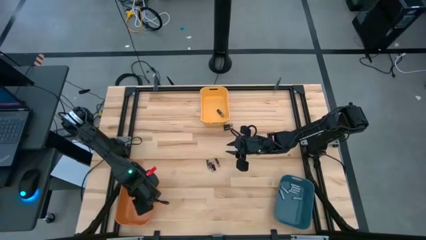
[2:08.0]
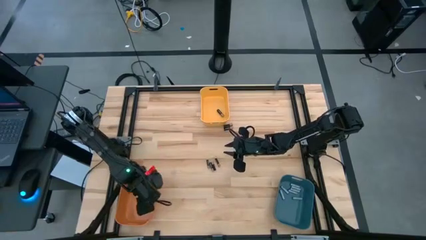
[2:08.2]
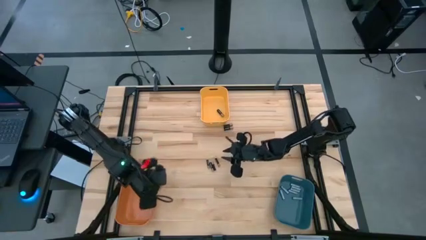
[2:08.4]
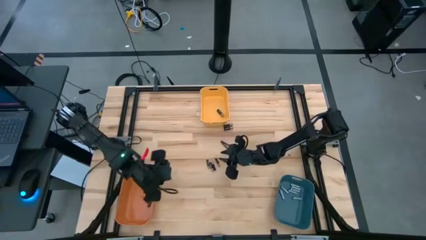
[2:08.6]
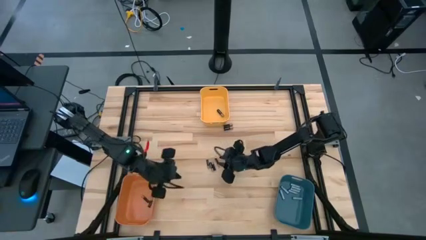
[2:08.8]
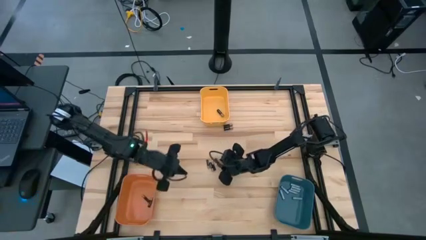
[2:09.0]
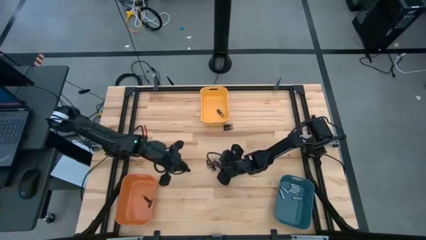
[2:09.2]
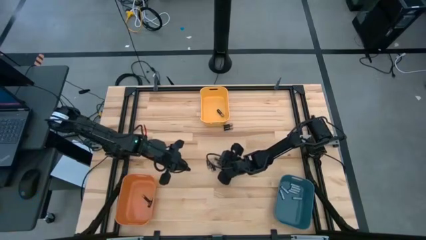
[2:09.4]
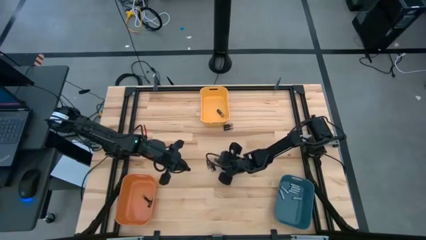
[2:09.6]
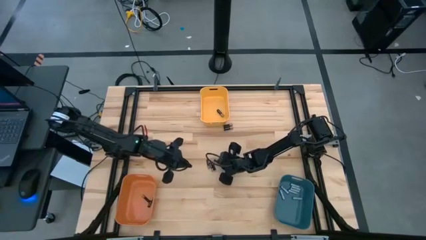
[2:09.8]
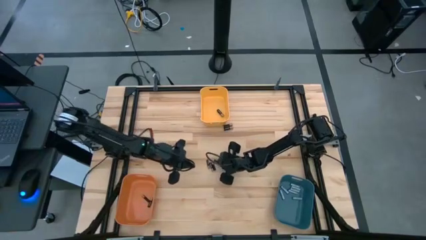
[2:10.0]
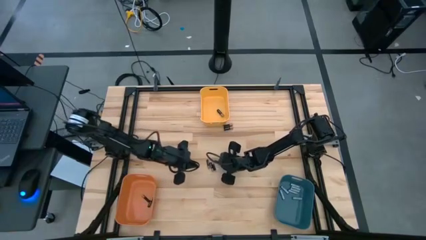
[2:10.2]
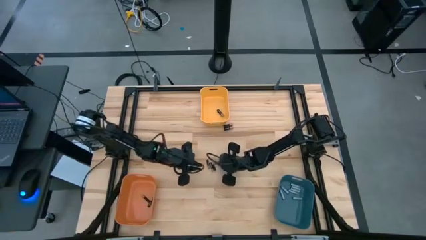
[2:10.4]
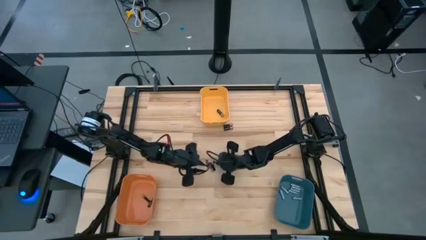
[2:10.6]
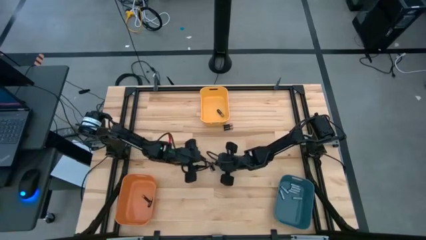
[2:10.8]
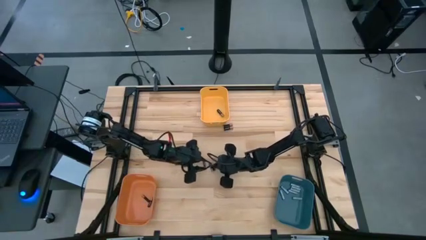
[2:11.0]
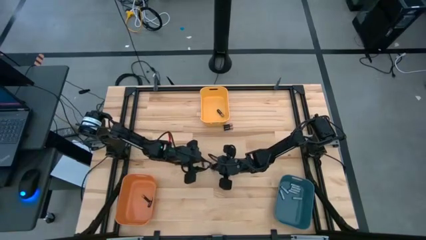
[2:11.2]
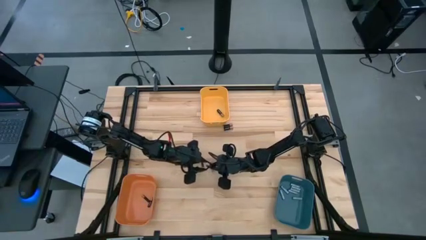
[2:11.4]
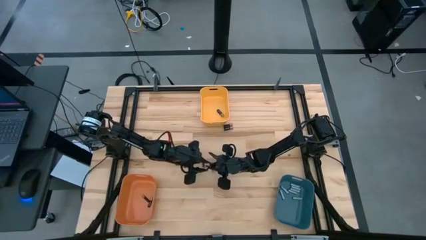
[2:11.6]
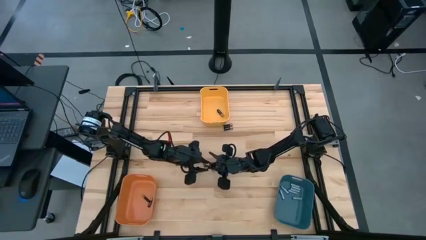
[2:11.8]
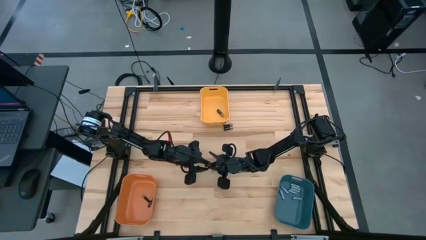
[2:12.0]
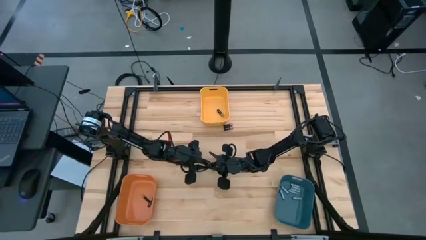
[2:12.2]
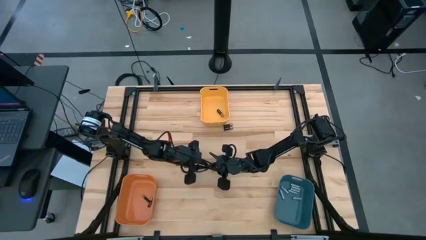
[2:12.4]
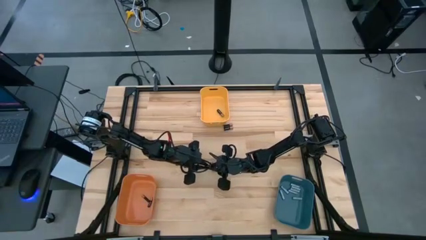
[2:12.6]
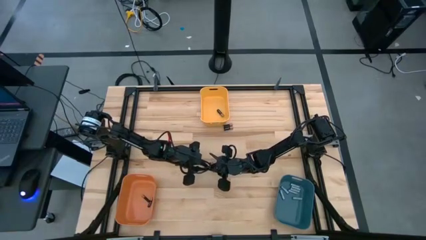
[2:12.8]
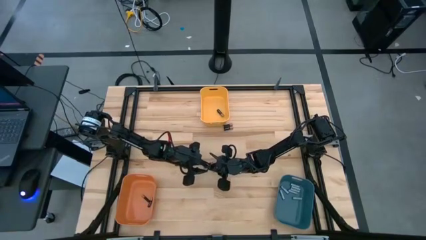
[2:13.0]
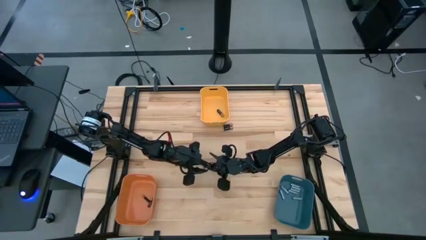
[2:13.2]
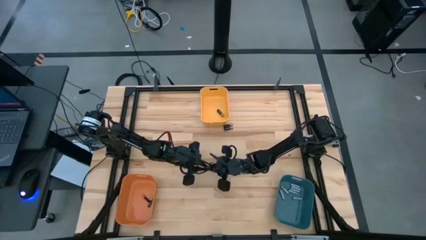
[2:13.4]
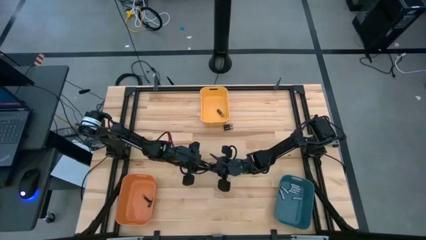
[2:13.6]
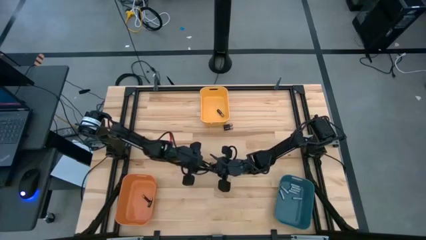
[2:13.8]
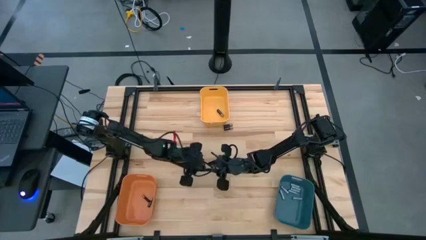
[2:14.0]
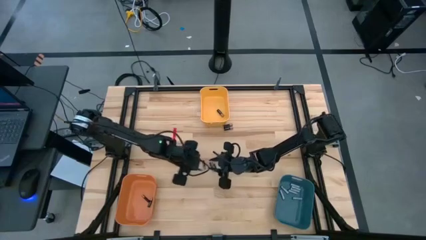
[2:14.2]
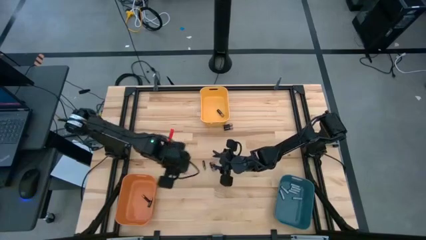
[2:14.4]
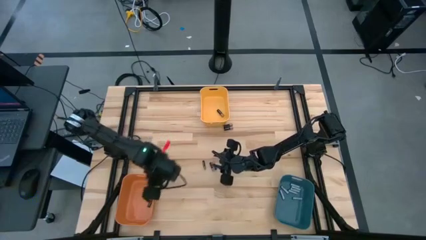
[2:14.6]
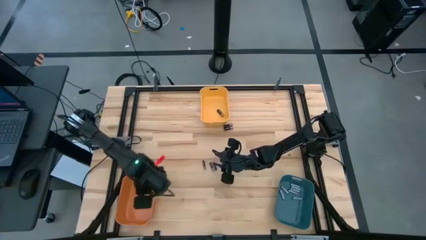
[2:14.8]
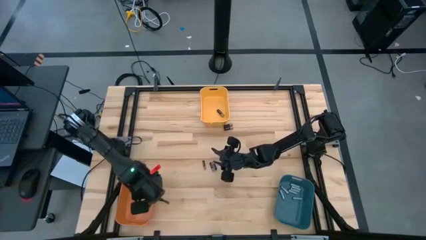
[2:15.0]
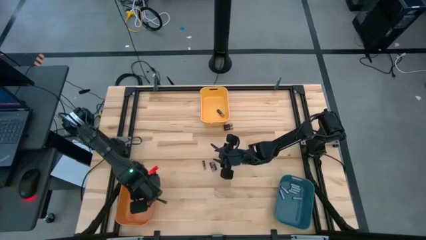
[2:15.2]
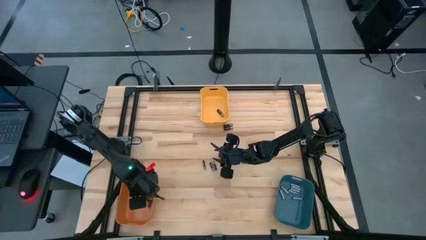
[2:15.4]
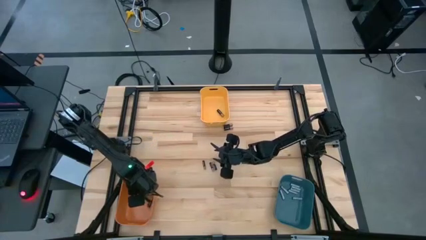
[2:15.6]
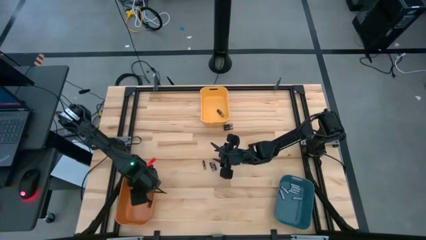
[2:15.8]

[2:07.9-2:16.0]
Task: Sort batteries
Put the small black battery into the orange bin

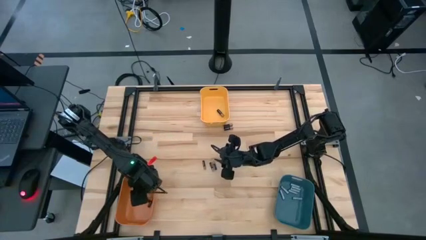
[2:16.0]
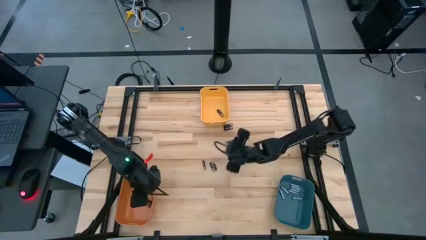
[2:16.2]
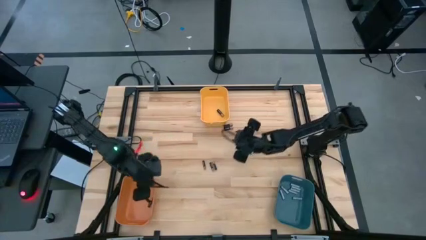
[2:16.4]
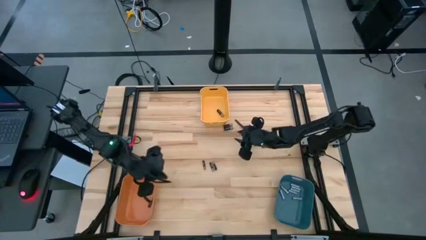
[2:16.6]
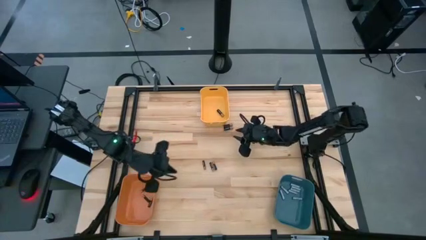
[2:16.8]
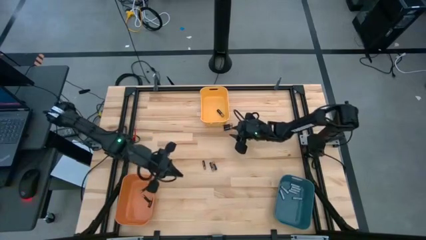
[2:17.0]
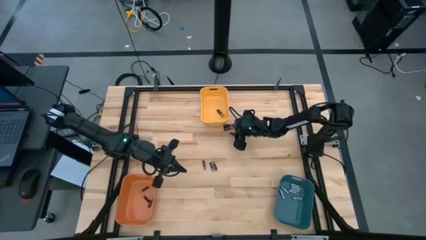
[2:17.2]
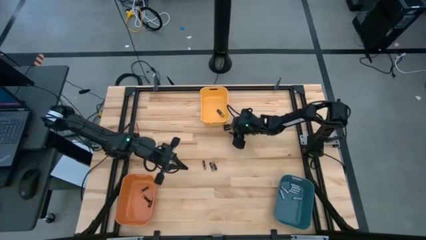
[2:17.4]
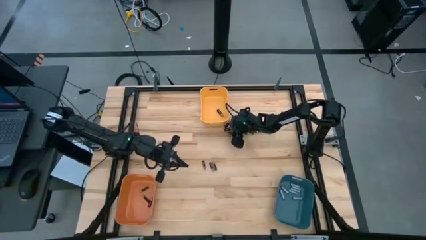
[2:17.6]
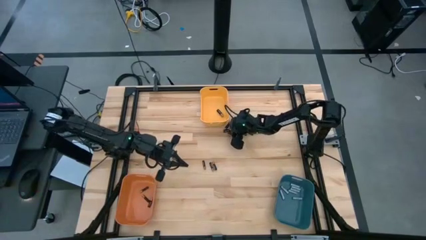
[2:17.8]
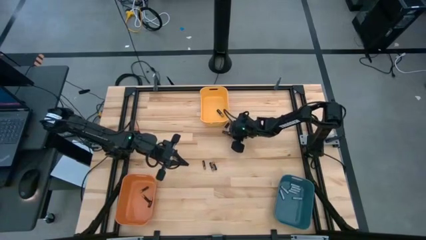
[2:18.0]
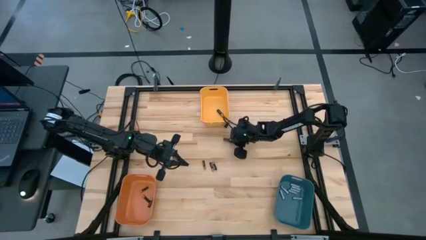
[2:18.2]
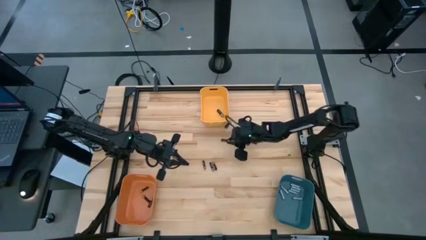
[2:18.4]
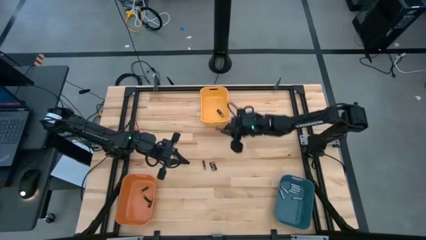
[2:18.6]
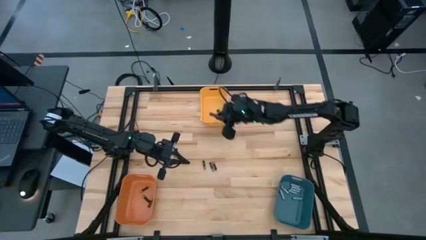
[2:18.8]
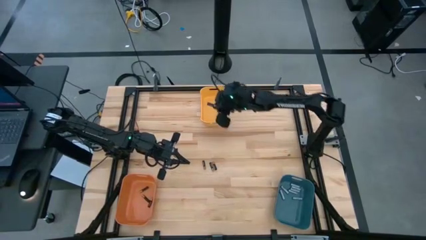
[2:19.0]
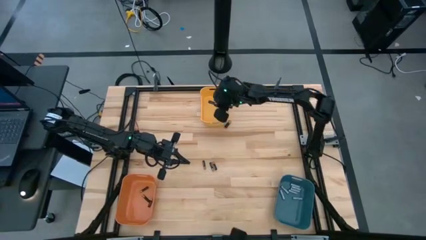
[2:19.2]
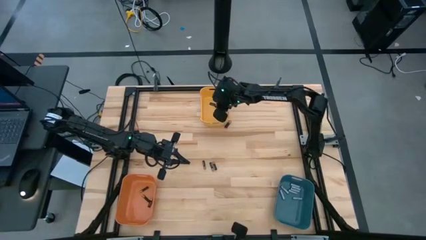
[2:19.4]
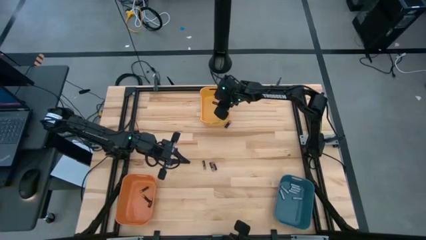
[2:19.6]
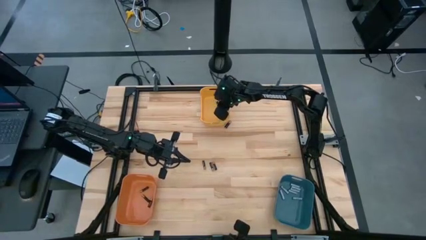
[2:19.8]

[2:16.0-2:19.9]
Put the large black battery into the yellow bin

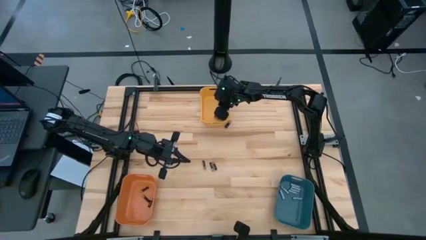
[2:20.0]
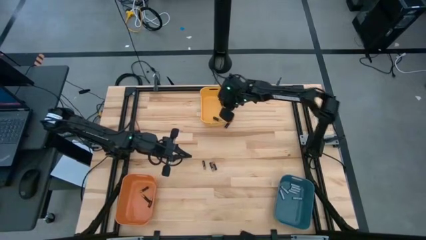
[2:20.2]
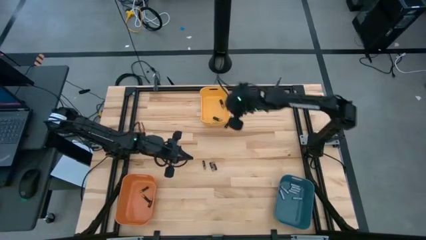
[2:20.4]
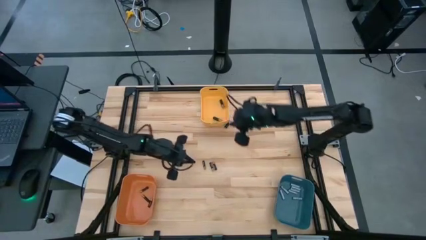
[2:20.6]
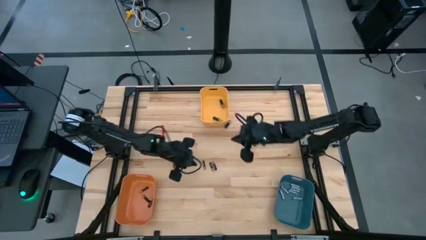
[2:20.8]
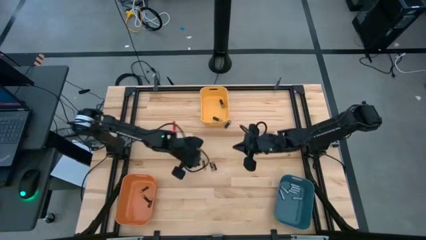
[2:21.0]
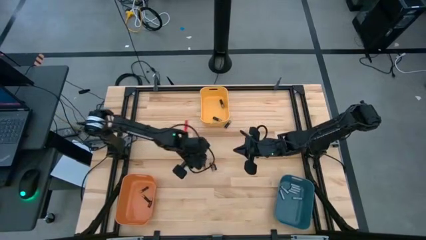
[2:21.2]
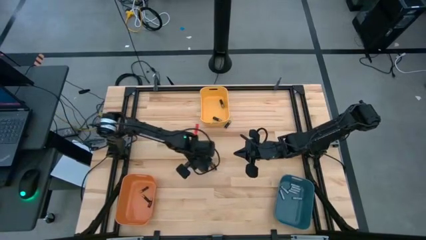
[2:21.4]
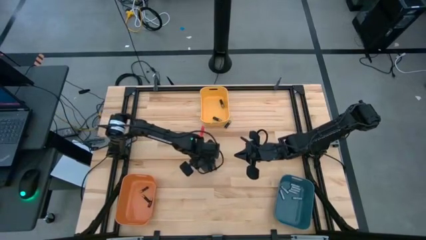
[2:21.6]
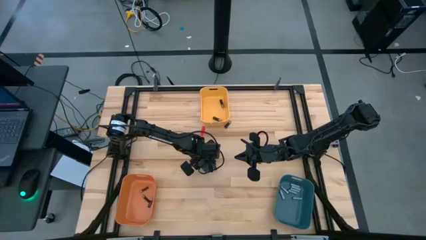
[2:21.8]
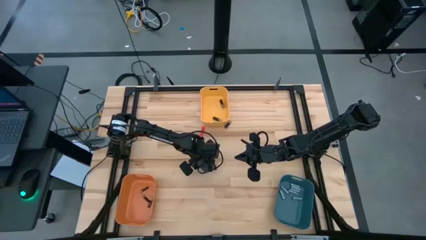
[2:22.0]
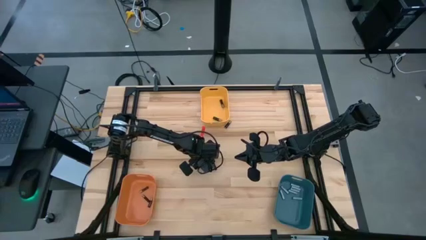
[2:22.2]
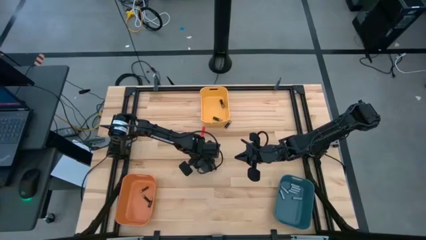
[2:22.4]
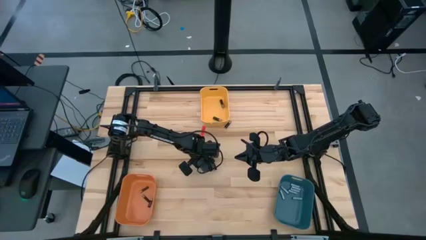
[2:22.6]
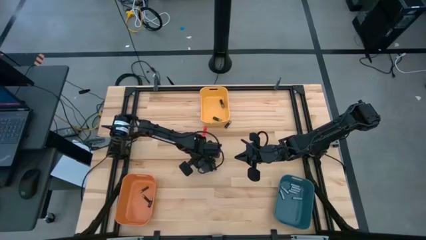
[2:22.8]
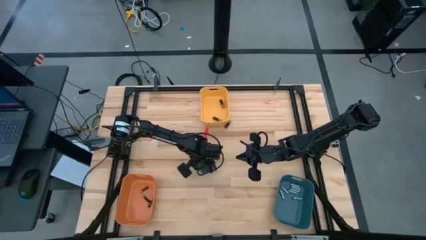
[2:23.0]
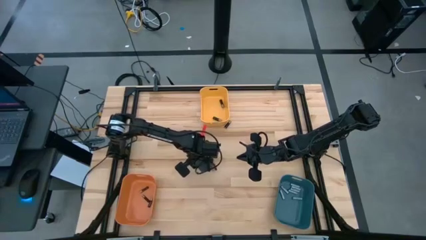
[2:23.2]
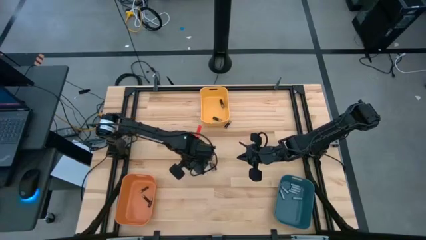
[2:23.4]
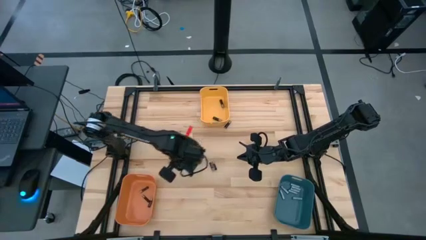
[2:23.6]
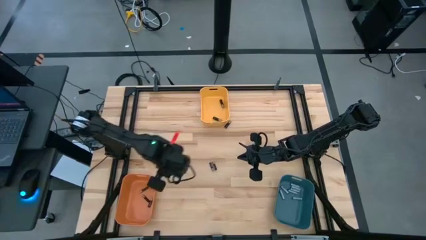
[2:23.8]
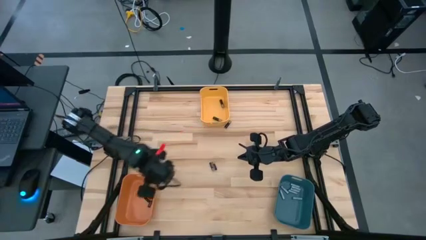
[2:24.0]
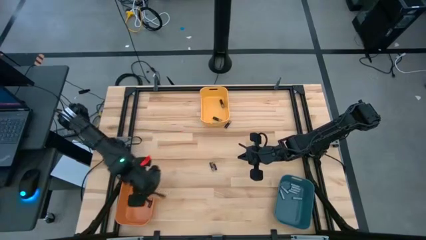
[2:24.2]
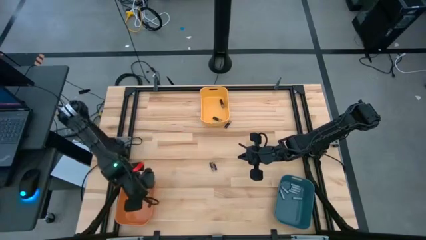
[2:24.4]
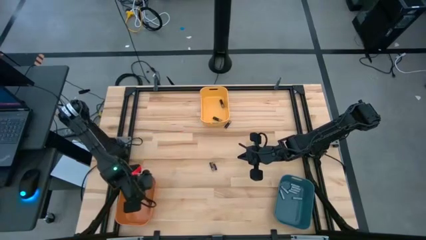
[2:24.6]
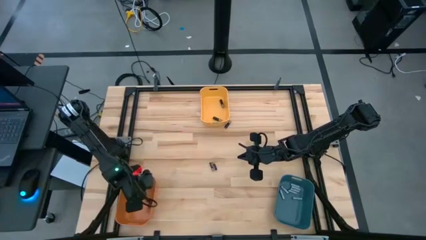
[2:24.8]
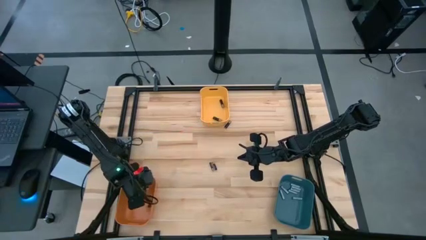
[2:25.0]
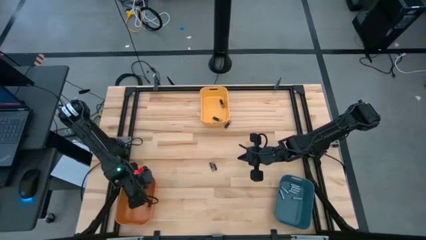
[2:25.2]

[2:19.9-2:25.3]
Put the small black battery into the orange bin
